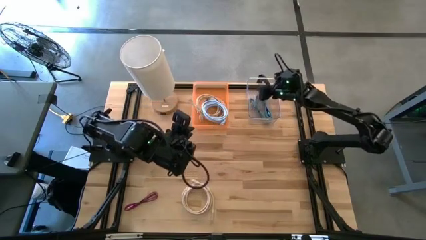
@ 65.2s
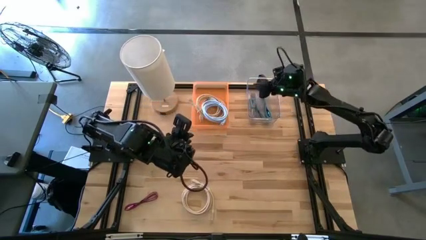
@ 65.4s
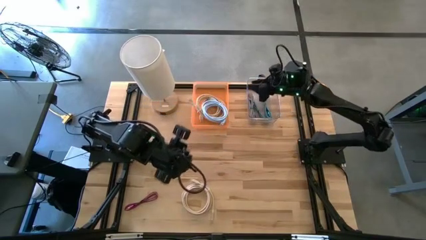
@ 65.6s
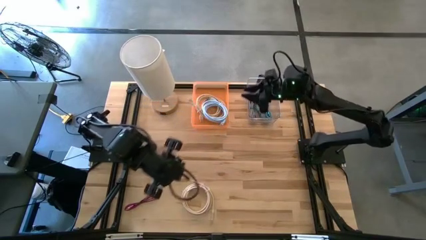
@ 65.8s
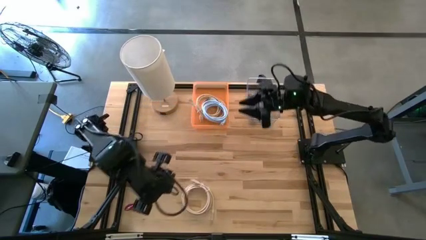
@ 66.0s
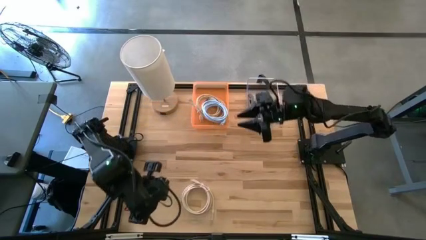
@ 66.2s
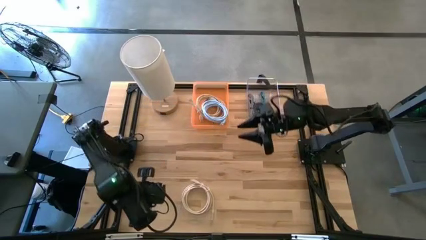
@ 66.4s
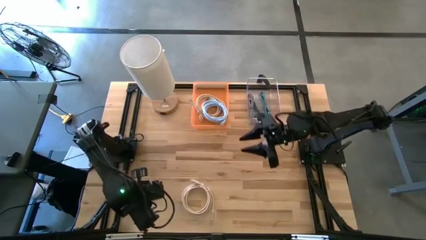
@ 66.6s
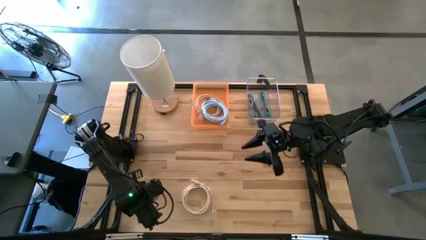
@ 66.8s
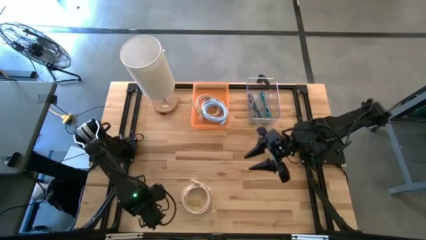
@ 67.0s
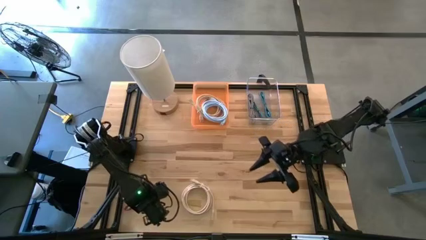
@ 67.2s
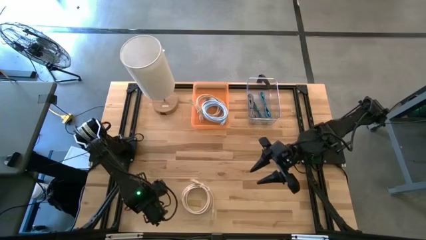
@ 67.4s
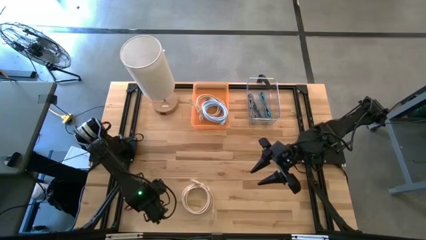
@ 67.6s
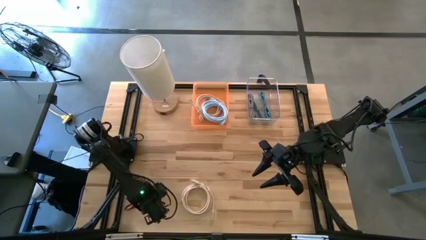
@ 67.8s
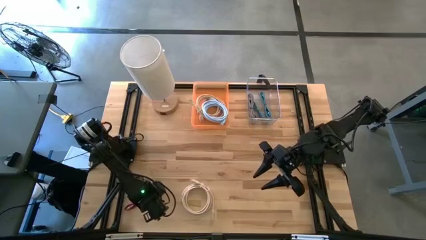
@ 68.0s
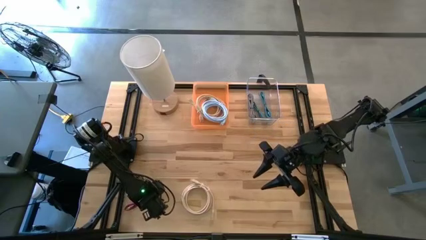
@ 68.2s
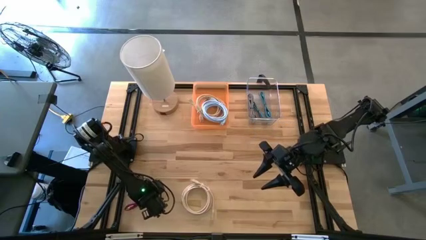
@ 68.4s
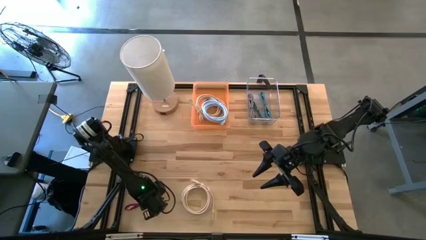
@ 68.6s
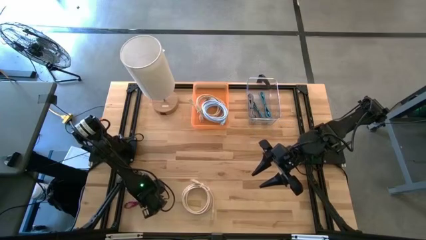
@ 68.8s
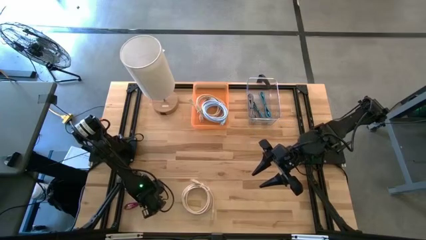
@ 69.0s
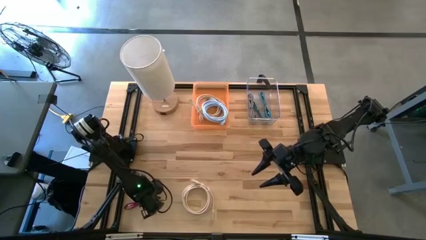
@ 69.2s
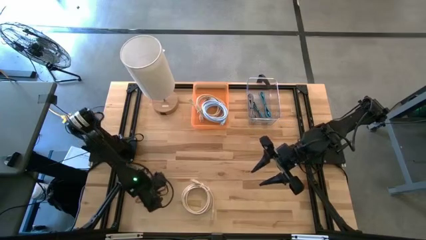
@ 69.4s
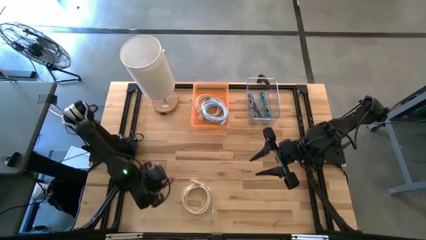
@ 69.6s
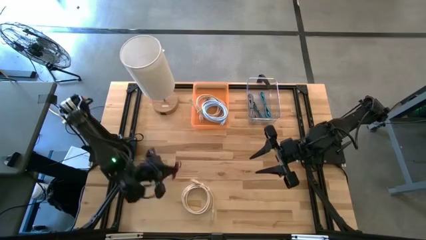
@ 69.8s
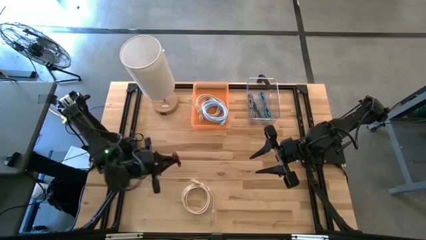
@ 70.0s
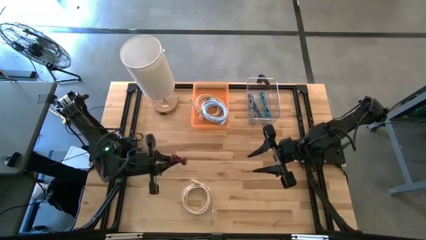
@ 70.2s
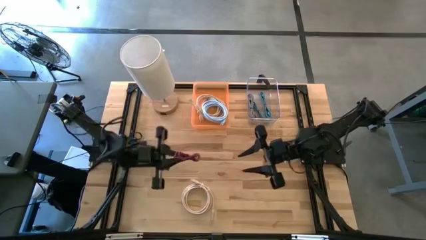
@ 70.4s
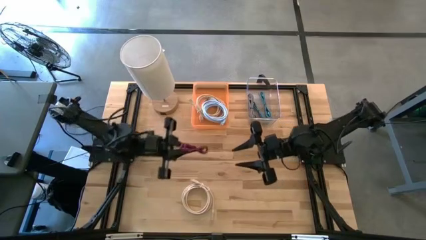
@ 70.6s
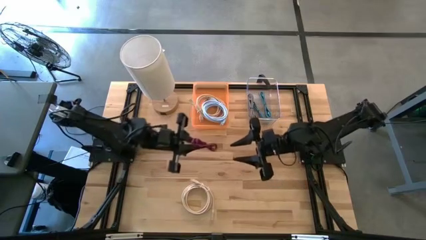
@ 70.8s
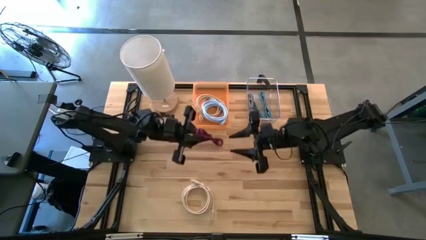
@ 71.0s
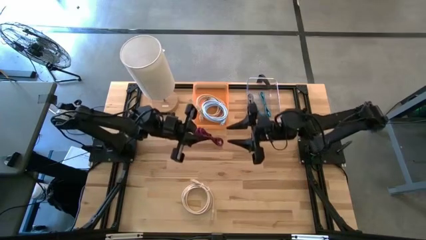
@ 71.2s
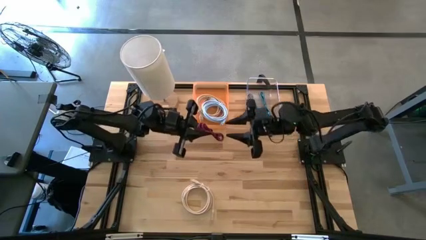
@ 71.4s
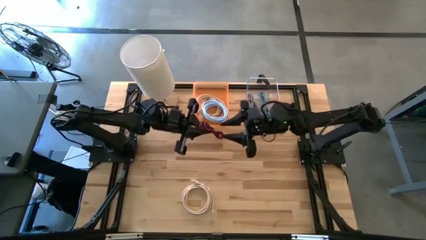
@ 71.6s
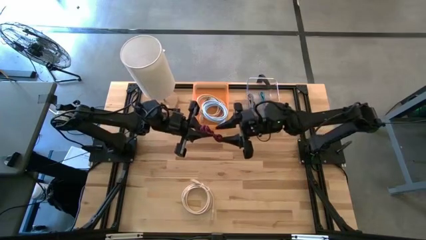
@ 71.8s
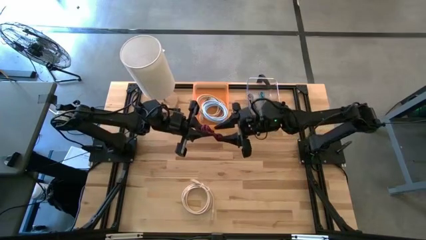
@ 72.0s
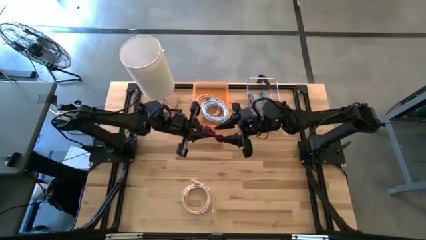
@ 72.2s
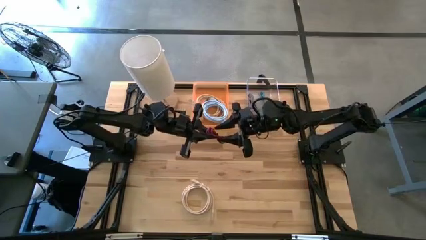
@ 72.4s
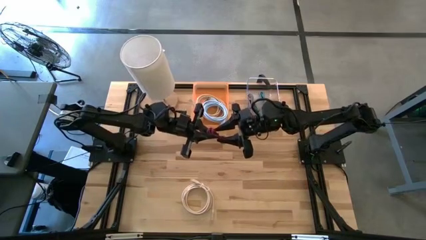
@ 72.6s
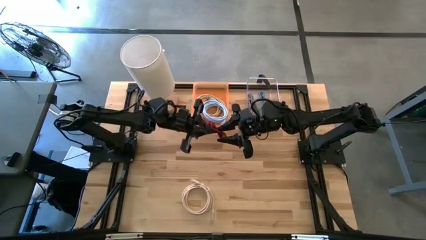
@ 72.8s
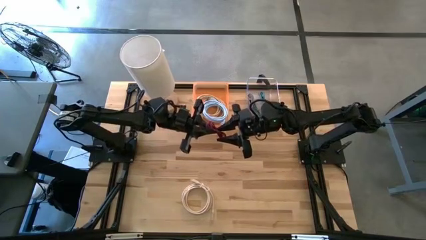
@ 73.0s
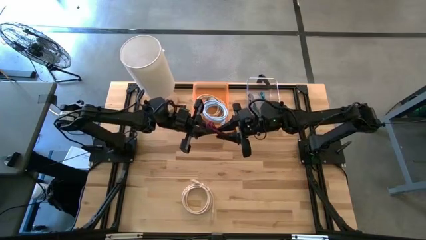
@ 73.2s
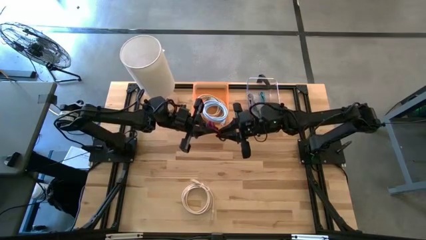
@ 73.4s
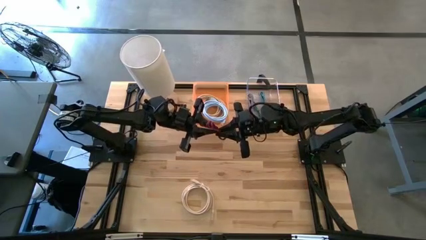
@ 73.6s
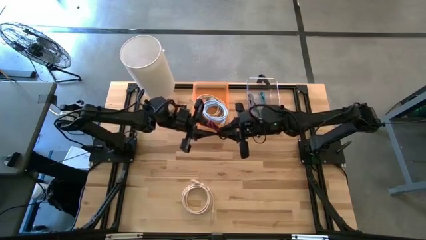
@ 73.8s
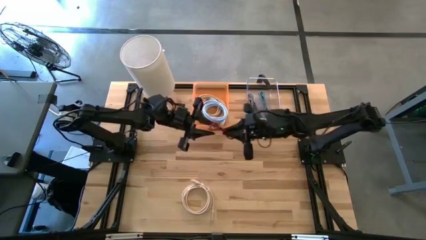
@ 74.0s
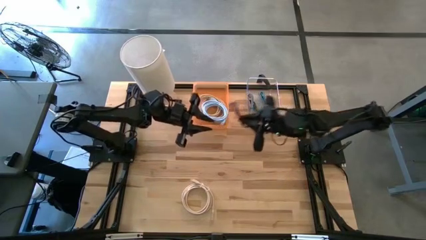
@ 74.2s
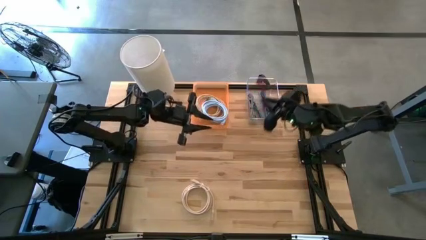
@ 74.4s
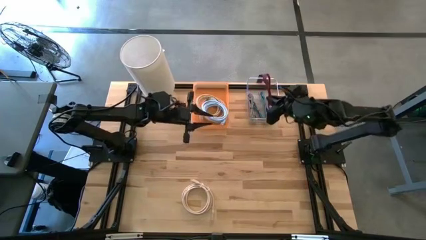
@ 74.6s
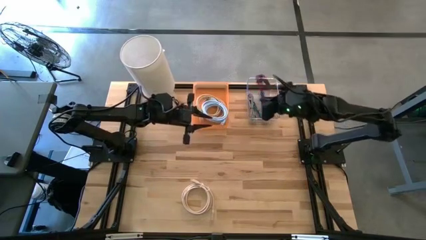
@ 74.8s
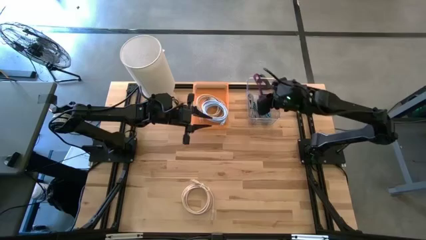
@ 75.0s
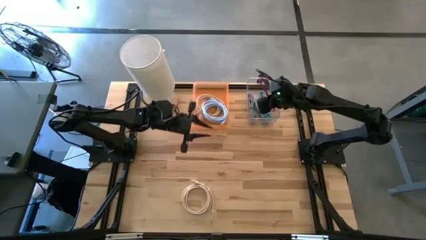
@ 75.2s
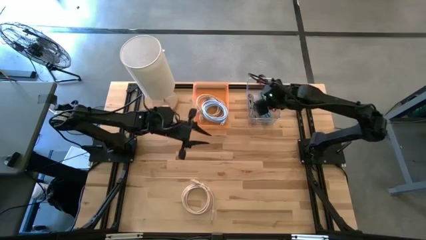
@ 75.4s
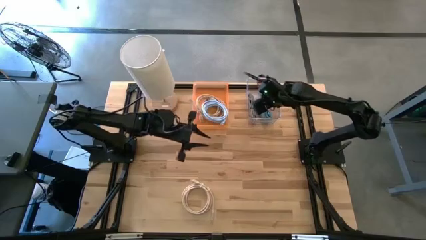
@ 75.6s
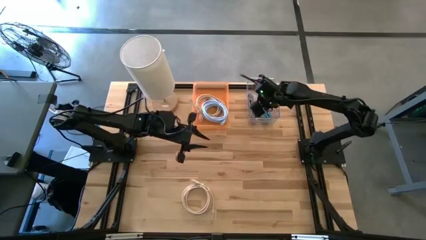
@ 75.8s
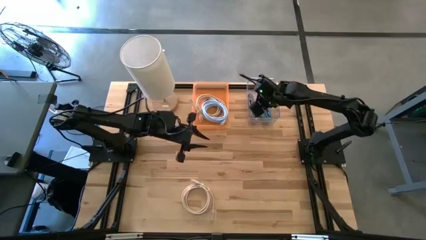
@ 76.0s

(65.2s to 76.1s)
Task: Pick & Place USB Port
Put the black pink charger cable into the transparent bin

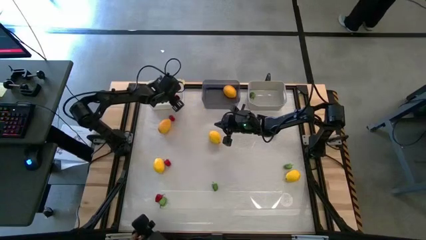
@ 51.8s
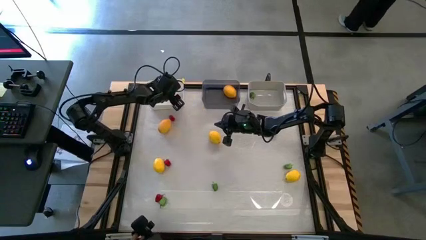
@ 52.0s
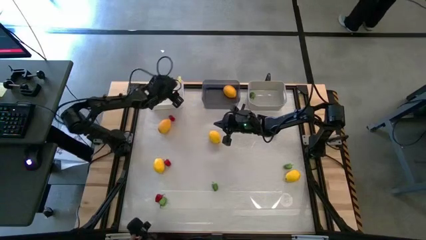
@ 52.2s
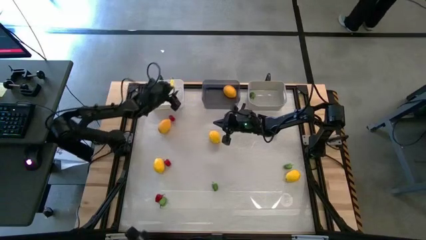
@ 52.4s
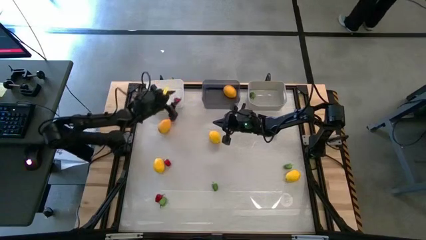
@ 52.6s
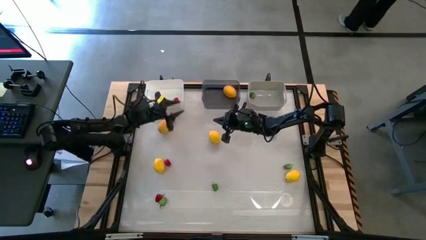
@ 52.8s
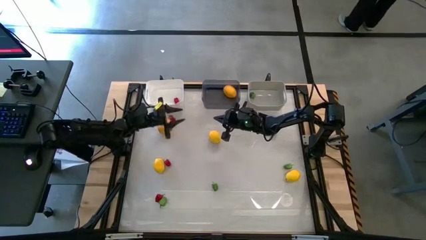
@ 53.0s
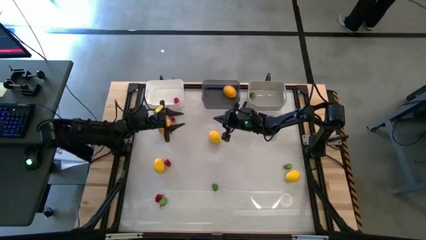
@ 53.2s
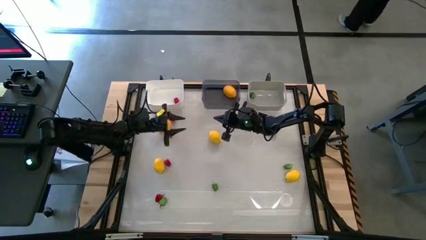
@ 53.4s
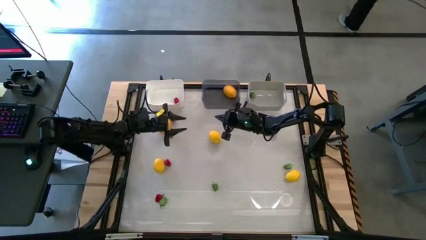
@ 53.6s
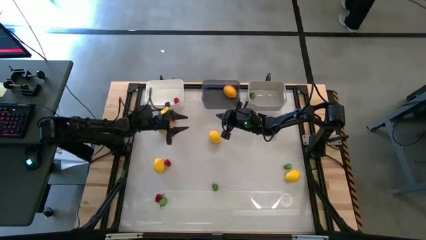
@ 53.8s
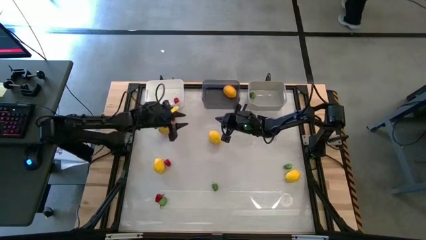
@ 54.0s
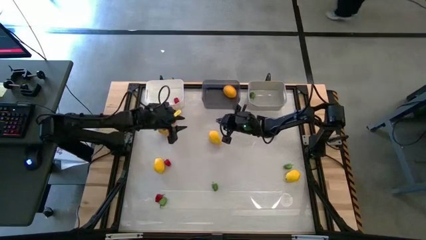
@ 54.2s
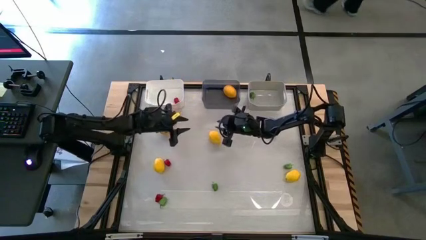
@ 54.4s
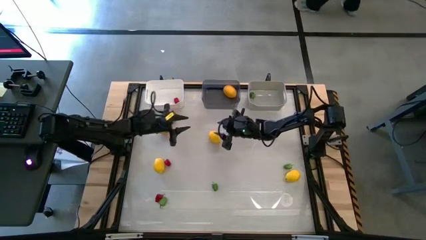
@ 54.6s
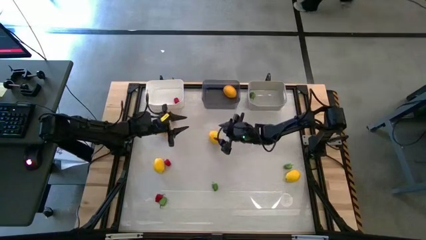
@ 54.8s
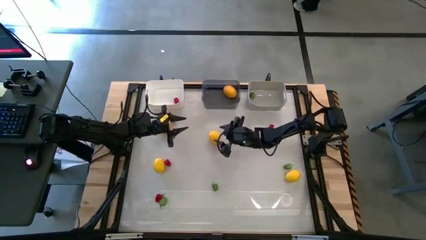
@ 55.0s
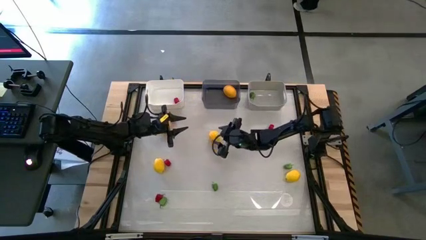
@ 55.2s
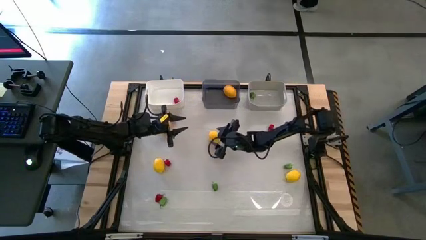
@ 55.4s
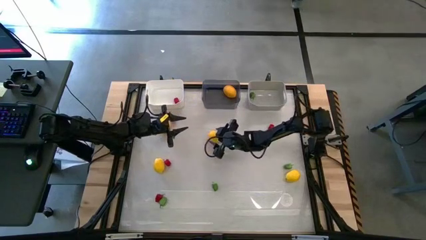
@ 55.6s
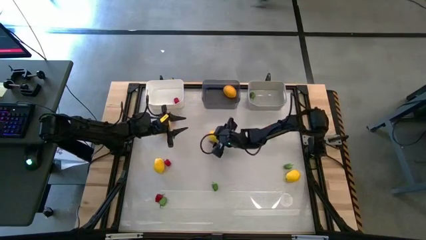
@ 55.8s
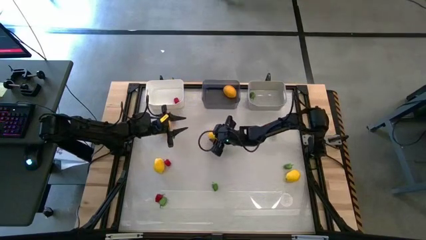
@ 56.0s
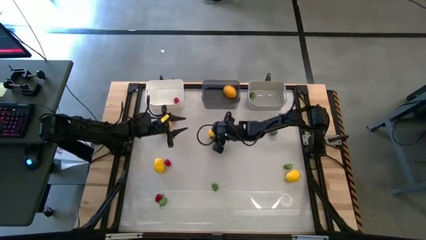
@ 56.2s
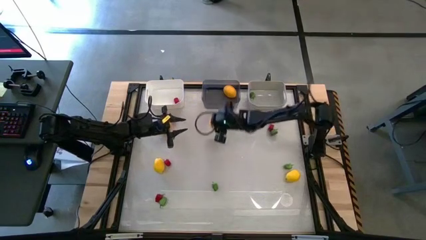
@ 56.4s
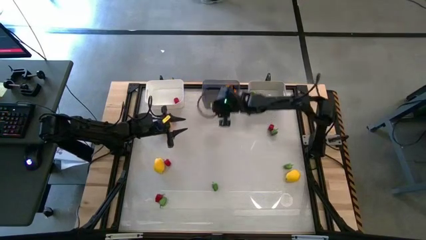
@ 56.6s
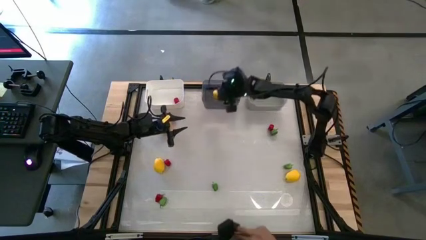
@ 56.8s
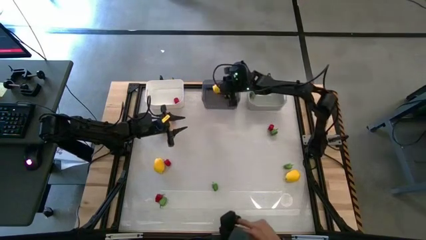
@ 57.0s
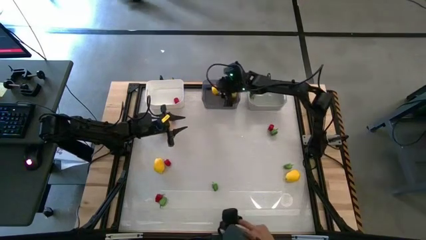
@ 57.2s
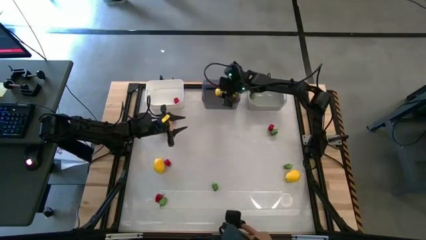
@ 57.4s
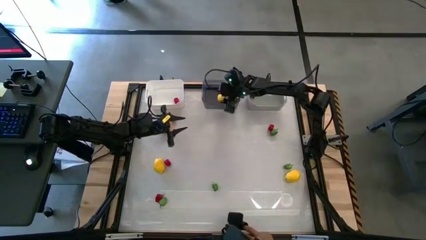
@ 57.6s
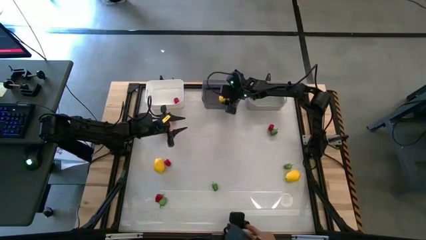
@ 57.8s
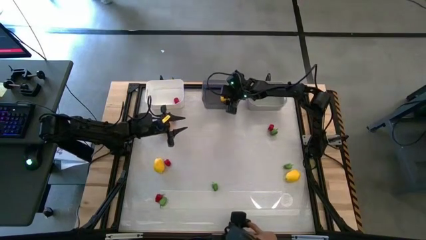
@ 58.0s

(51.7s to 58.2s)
Task: Sort produce into baskets
Put the lemon into the black bin
